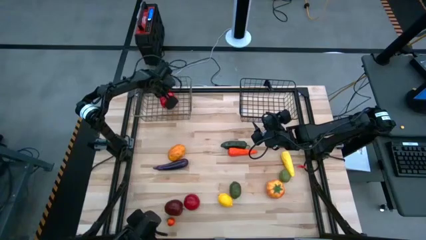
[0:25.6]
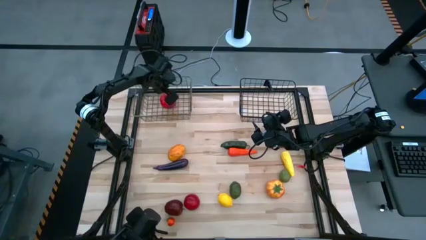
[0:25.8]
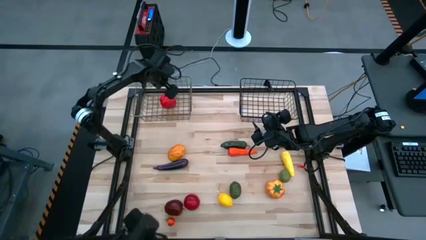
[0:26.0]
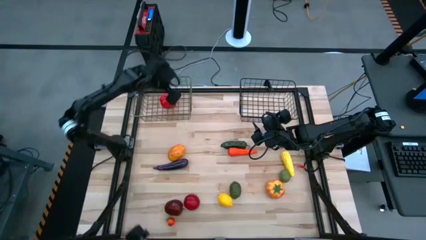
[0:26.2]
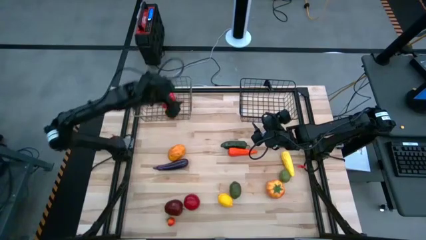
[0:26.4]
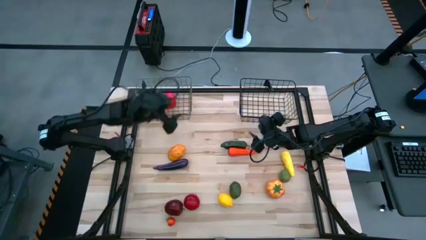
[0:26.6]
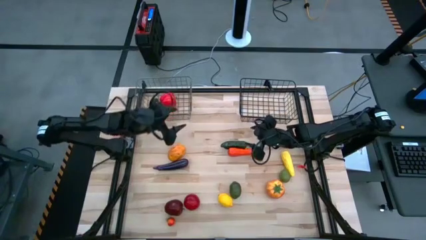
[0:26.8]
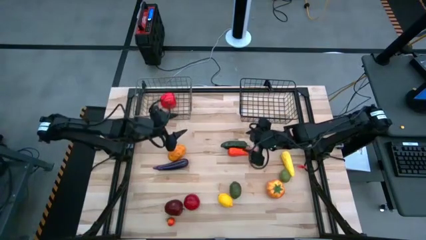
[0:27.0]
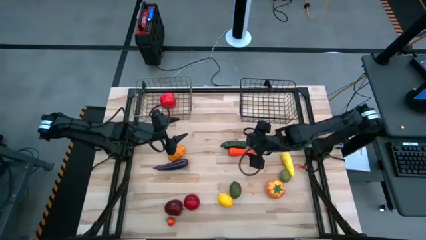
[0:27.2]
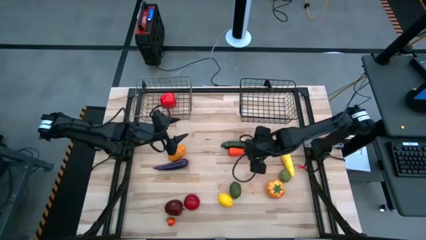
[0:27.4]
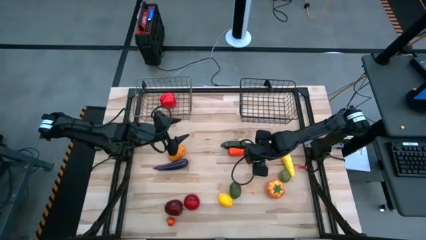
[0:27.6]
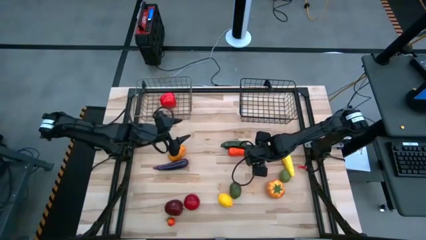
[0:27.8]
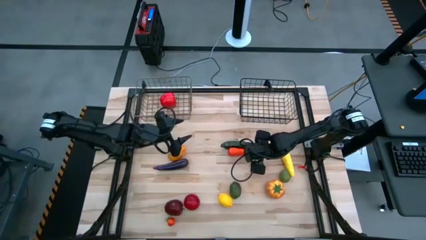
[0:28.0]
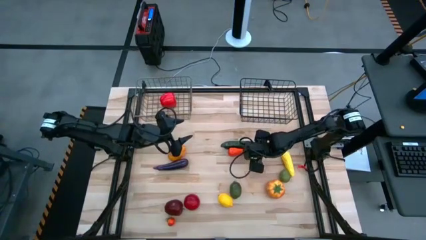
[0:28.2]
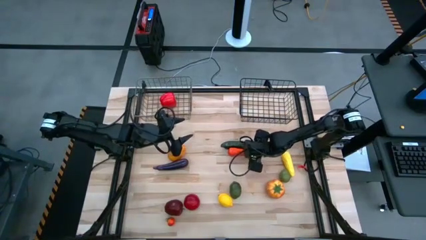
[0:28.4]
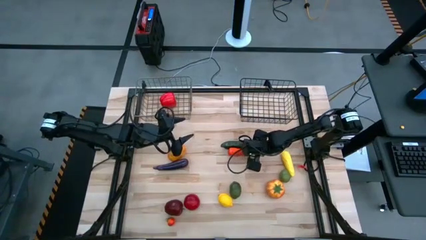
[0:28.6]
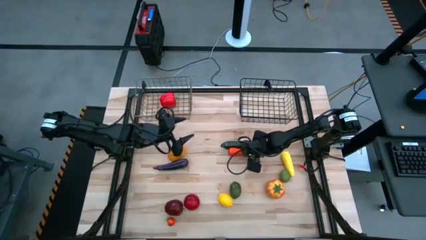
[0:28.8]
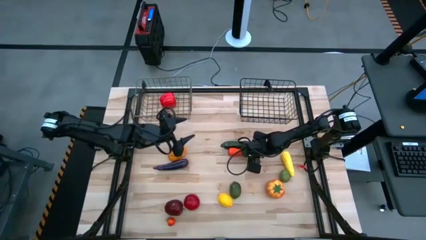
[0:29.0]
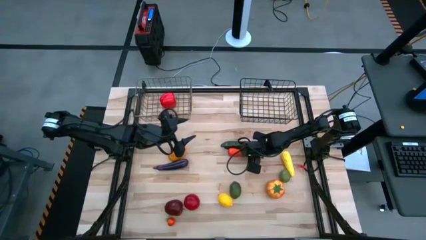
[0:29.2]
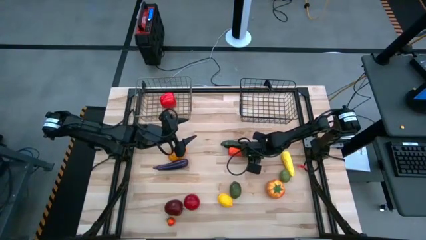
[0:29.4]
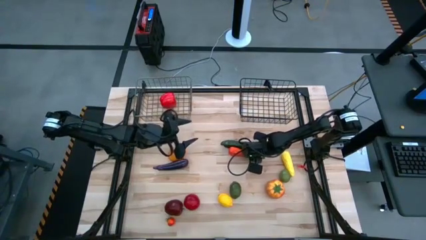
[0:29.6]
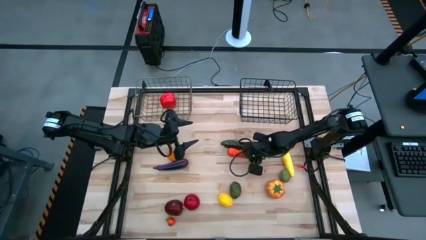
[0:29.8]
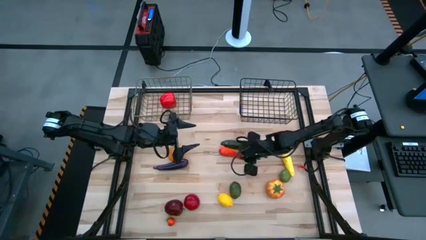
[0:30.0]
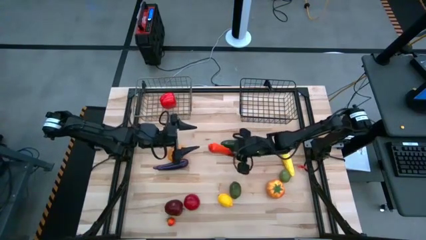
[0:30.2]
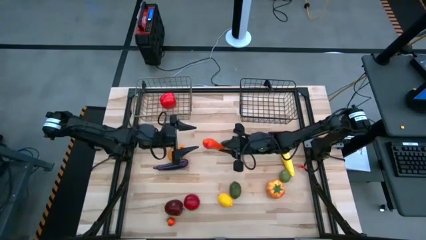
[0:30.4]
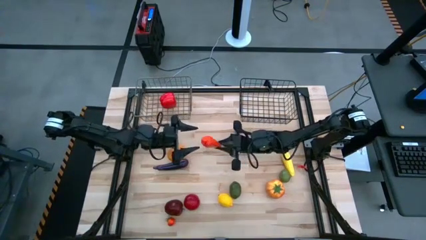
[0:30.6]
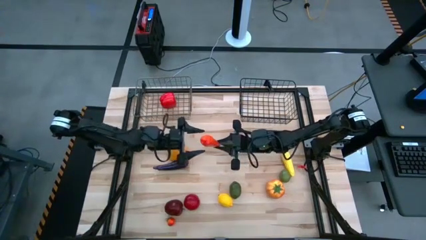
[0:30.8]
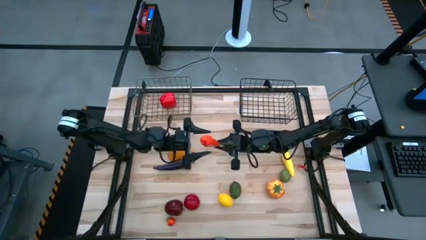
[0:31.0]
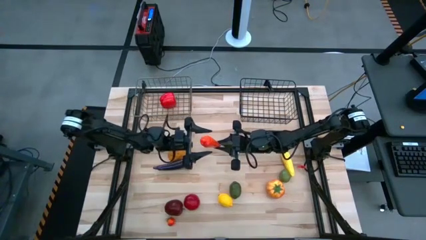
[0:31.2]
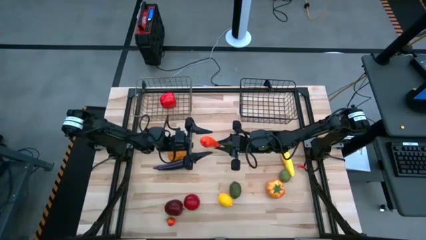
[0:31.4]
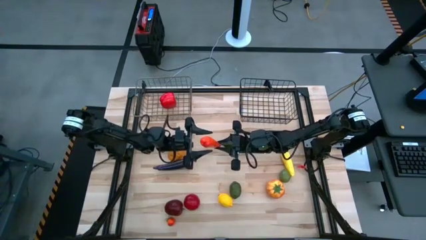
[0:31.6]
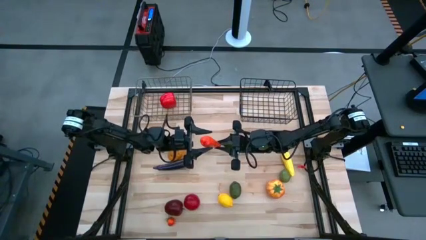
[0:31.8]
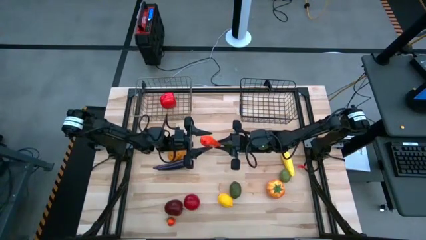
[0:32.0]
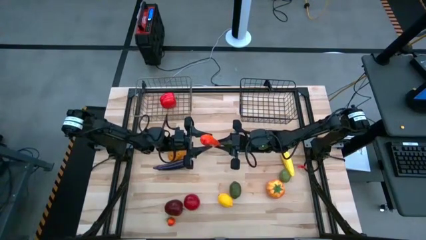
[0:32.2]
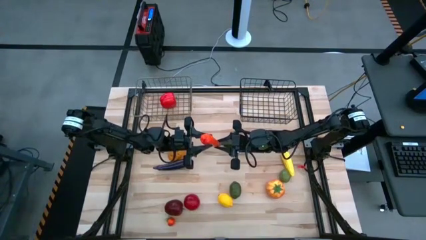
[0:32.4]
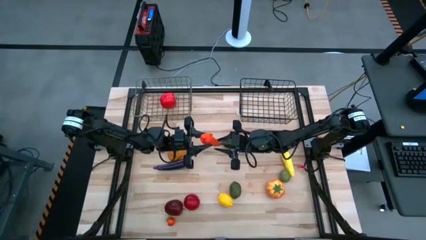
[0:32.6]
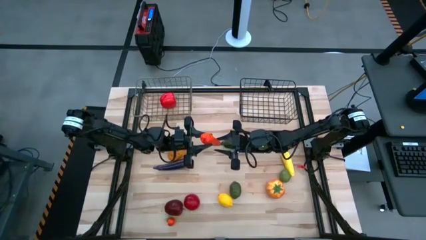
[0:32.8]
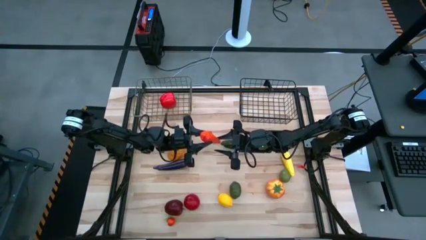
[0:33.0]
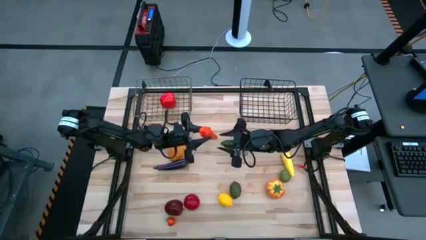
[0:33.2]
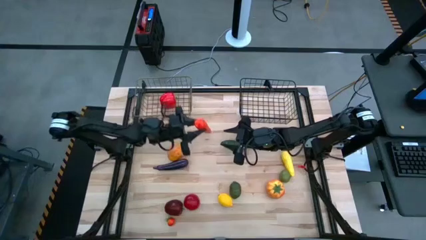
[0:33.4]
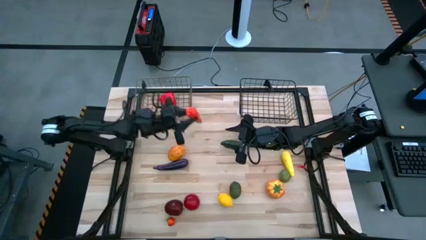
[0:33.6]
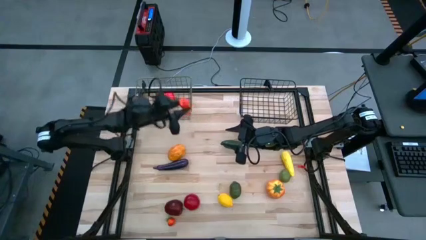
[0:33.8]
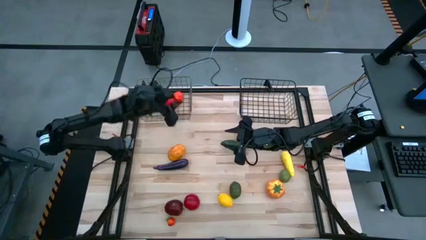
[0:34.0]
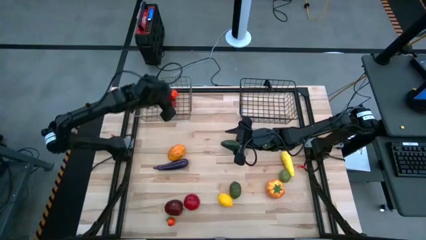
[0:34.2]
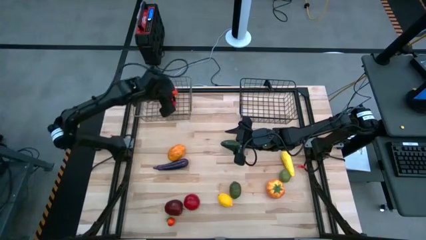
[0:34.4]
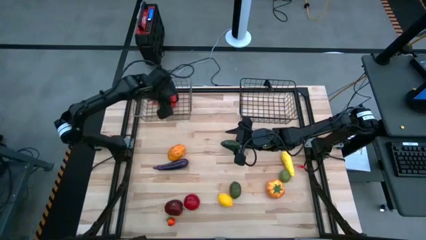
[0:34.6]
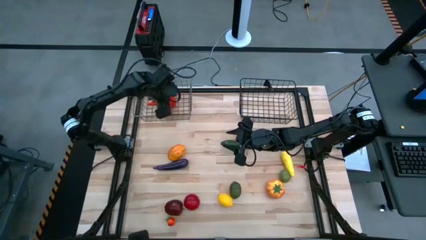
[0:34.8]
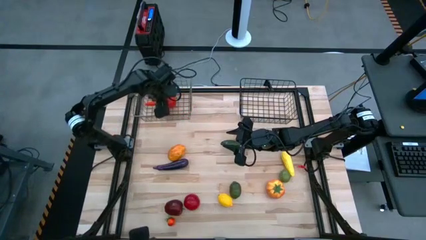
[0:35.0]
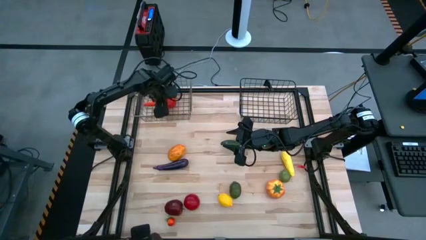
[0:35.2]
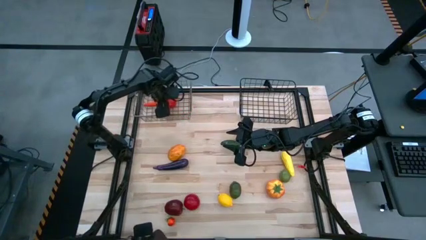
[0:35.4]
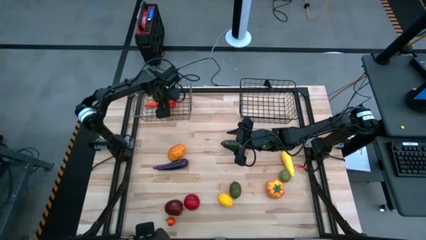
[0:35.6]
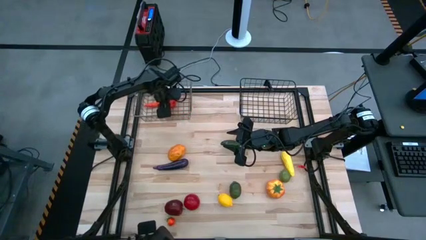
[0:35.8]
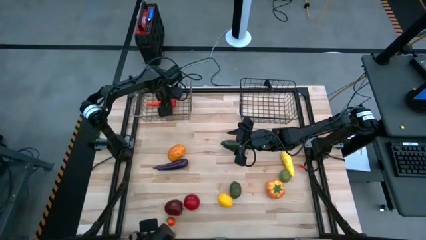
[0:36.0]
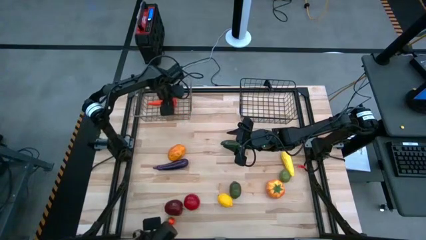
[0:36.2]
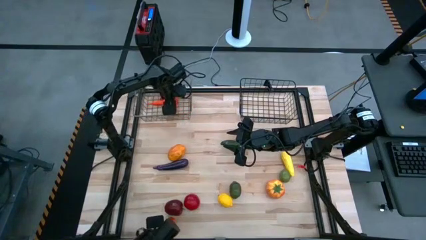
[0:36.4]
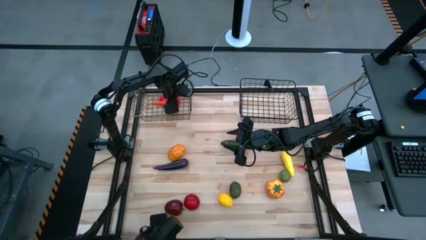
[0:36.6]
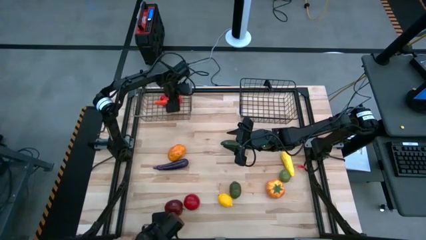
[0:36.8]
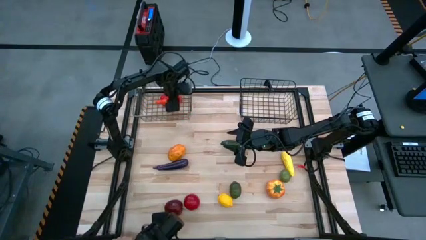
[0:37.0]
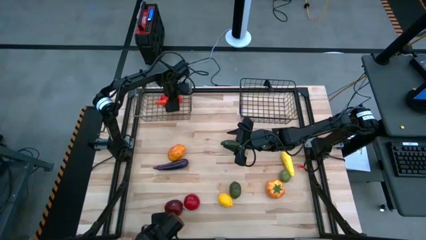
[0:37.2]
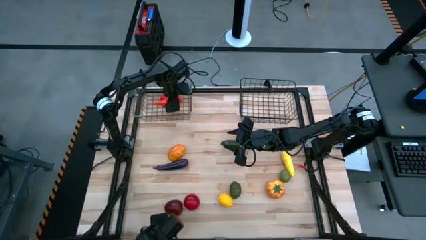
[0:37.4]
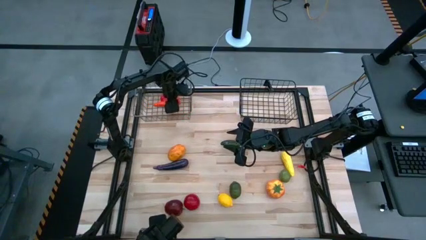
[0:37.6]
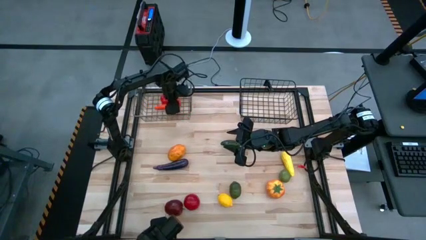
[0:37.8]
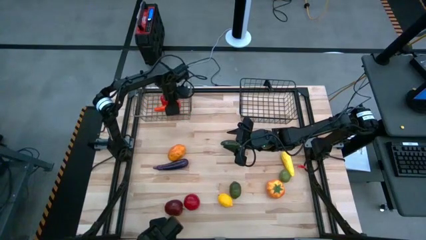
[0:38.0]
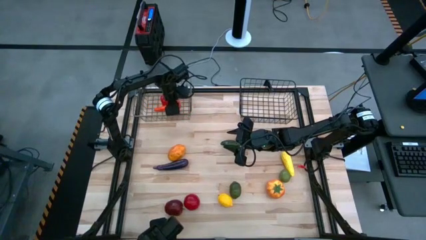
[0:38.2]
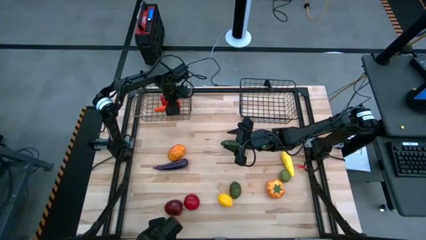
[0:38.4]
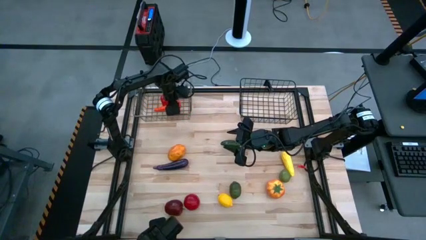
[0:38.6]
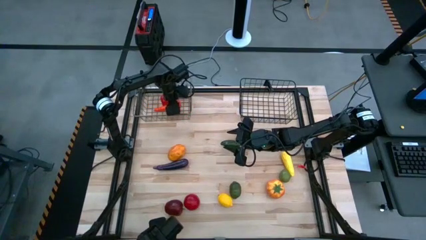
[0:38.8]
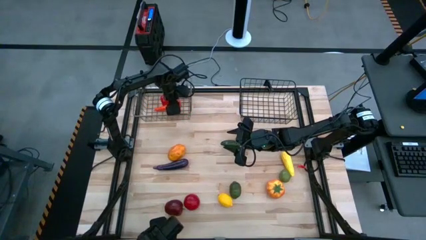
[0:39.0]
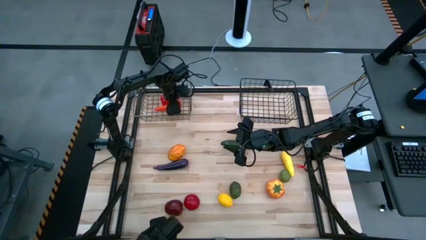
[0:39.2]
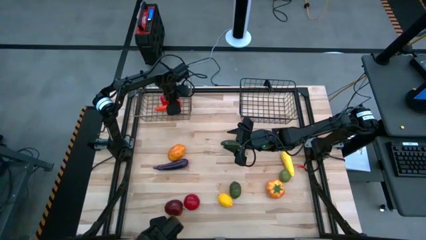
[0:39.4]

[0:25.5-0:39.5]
Task: Sort produce into baskets
Put the carrot into the brown wire basket
